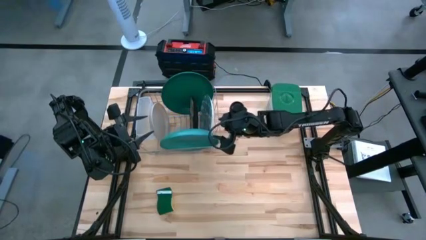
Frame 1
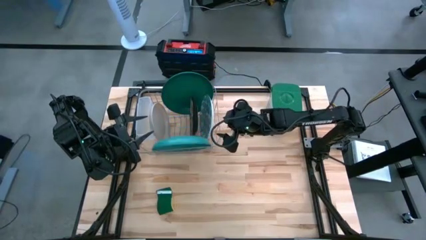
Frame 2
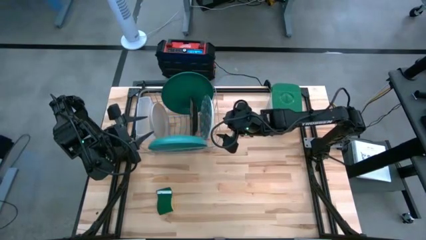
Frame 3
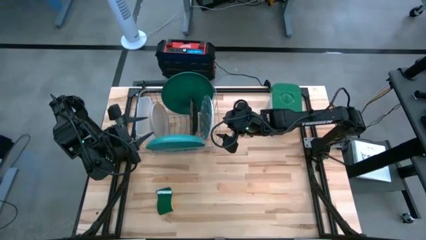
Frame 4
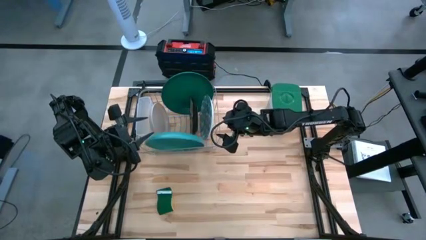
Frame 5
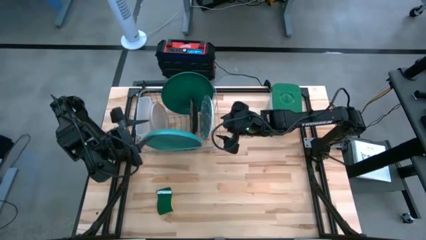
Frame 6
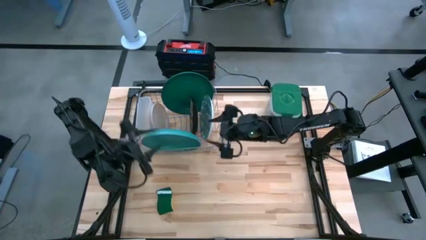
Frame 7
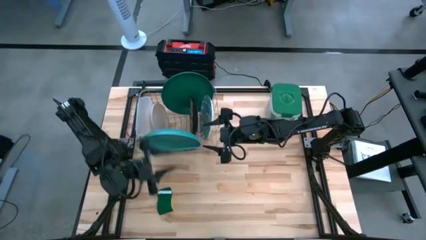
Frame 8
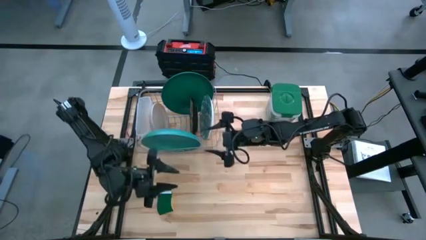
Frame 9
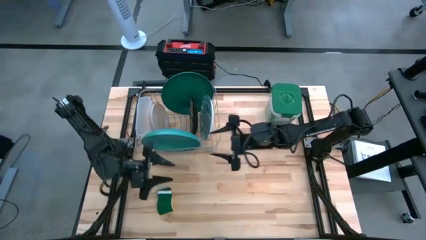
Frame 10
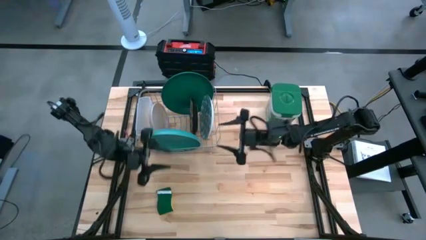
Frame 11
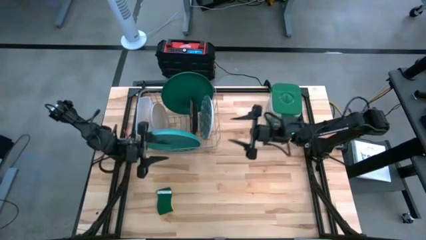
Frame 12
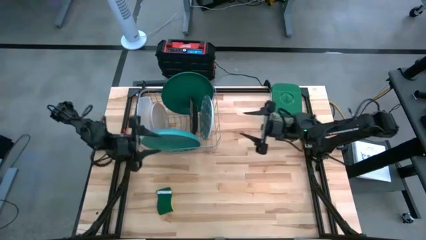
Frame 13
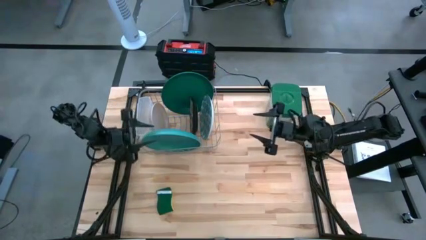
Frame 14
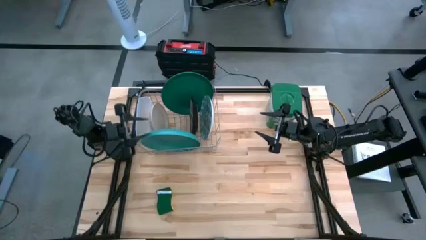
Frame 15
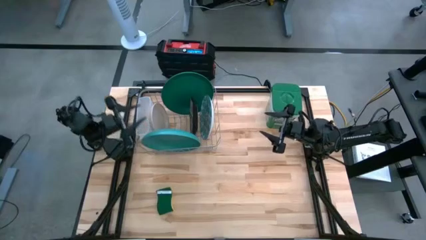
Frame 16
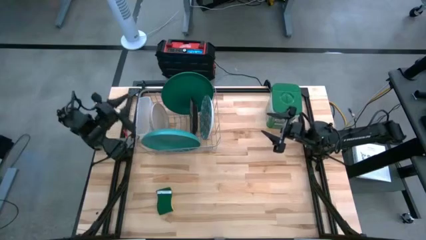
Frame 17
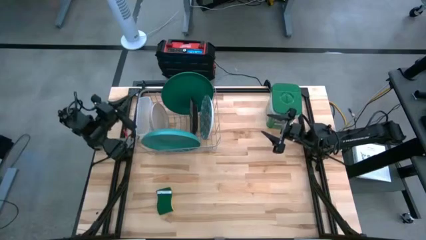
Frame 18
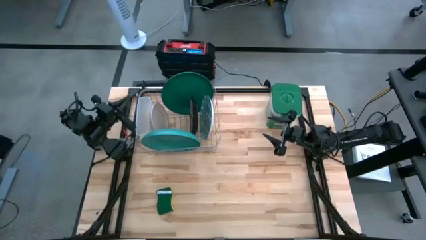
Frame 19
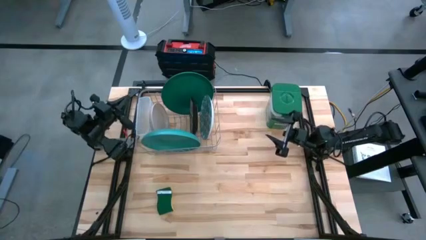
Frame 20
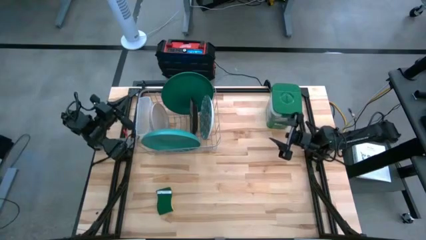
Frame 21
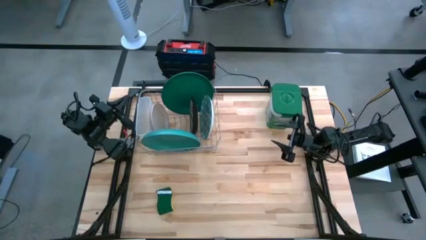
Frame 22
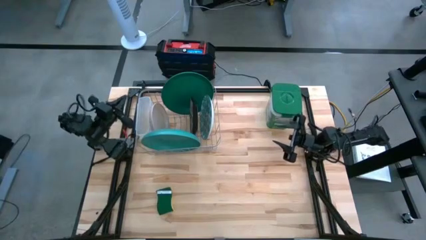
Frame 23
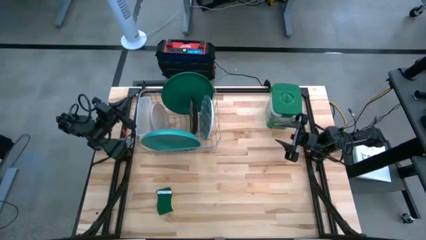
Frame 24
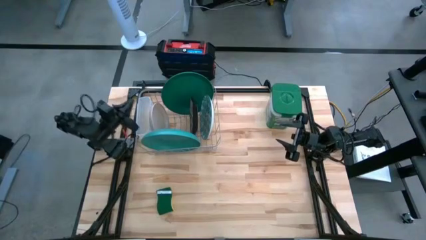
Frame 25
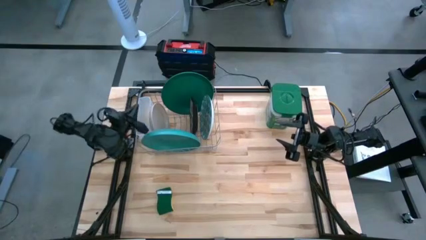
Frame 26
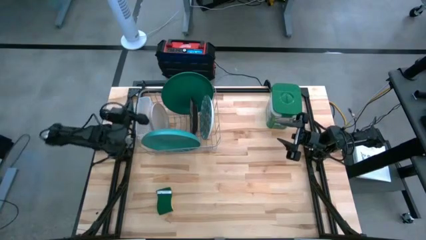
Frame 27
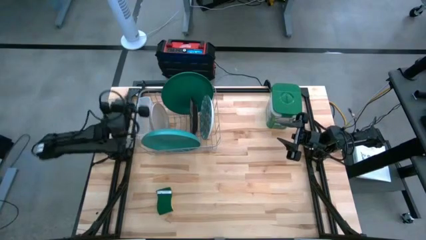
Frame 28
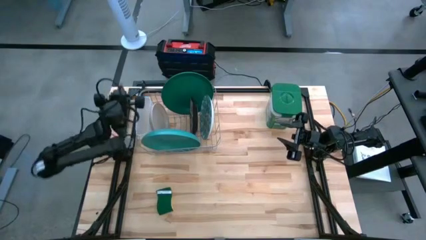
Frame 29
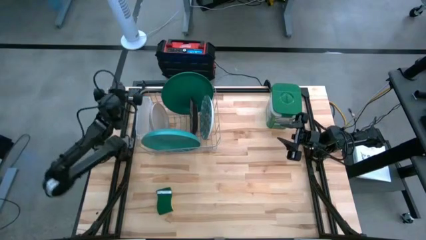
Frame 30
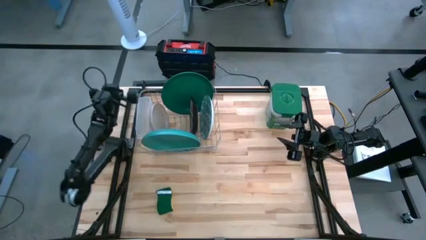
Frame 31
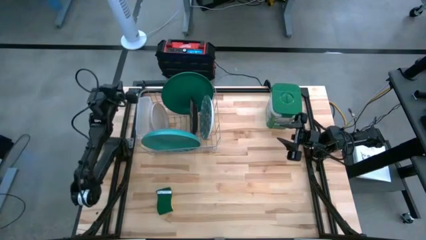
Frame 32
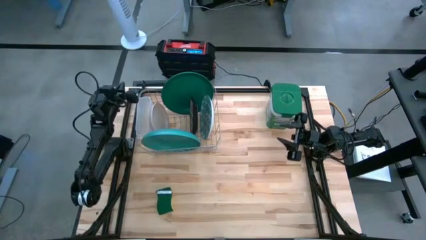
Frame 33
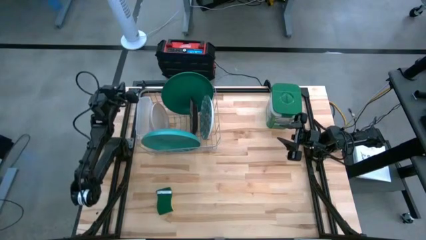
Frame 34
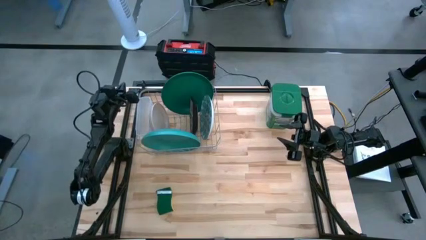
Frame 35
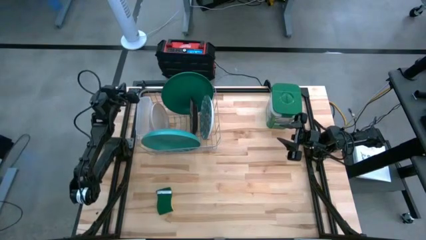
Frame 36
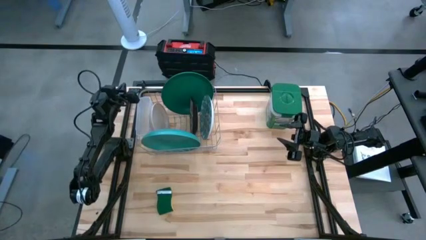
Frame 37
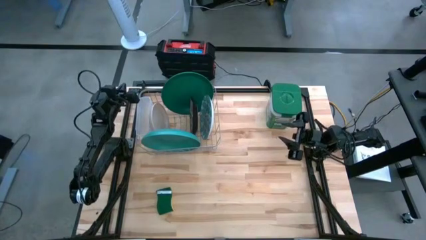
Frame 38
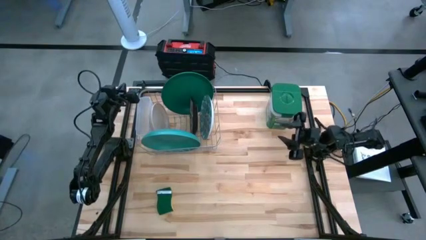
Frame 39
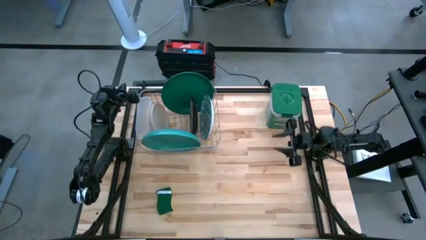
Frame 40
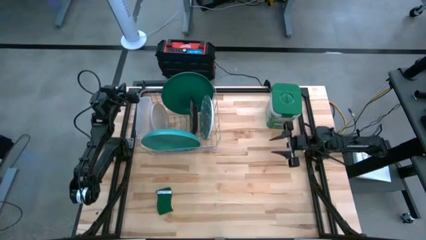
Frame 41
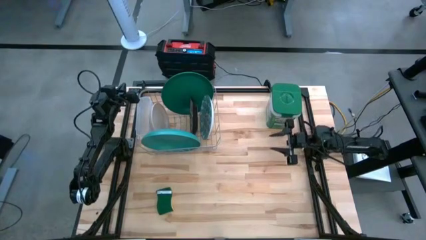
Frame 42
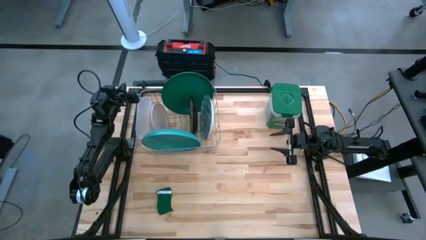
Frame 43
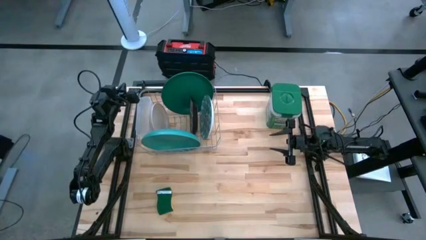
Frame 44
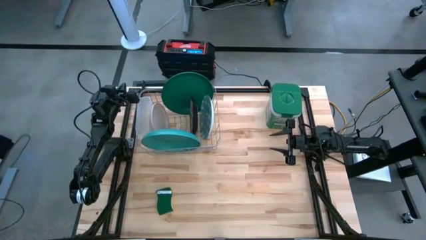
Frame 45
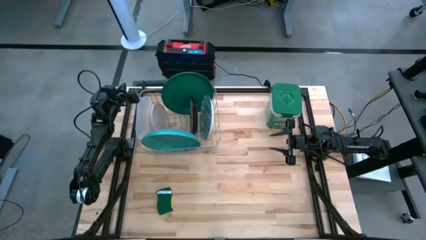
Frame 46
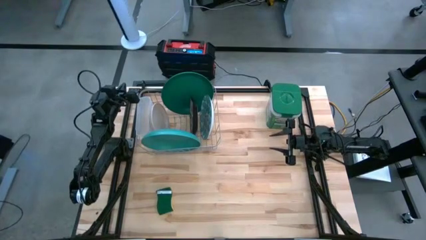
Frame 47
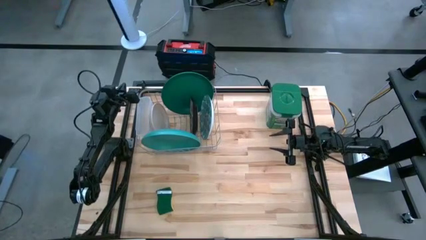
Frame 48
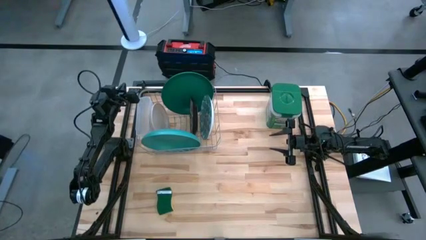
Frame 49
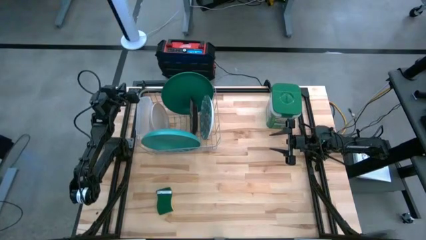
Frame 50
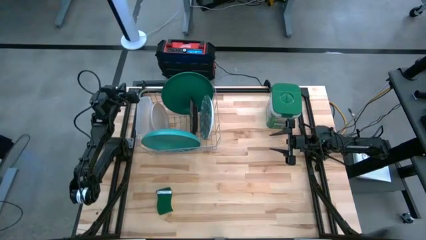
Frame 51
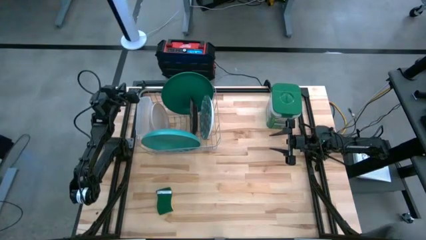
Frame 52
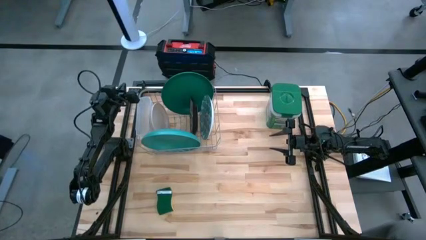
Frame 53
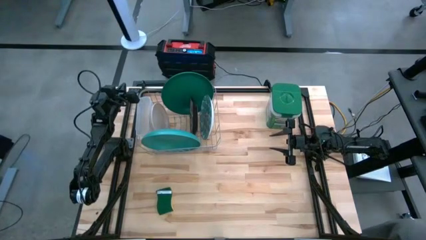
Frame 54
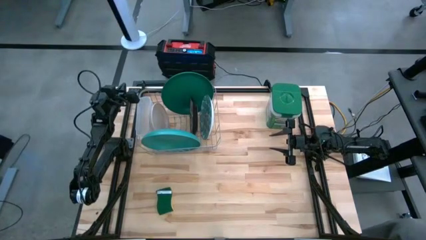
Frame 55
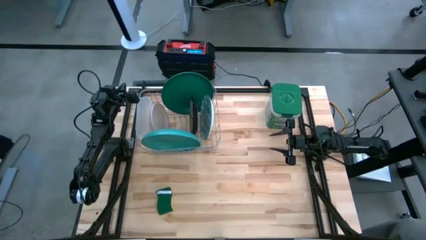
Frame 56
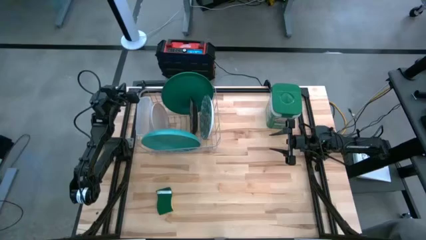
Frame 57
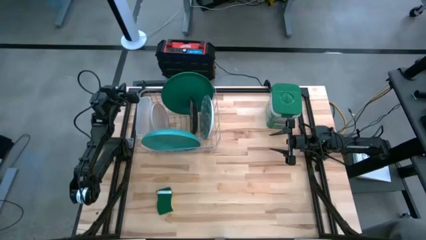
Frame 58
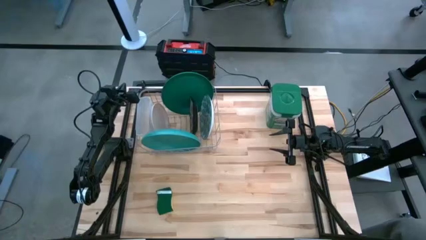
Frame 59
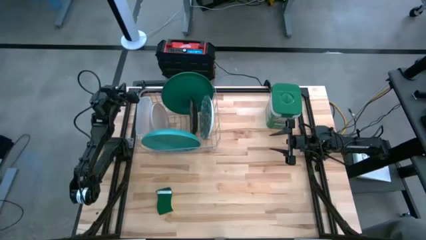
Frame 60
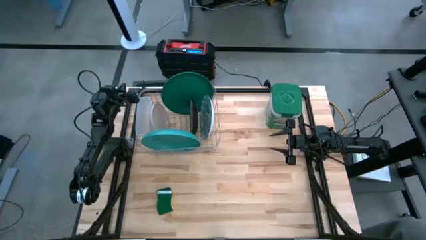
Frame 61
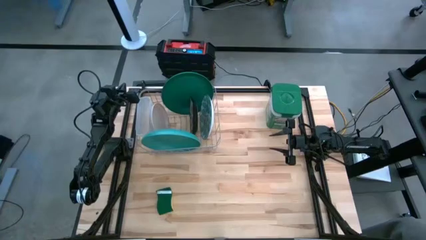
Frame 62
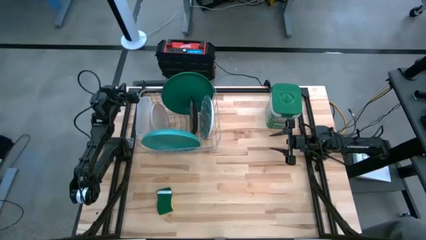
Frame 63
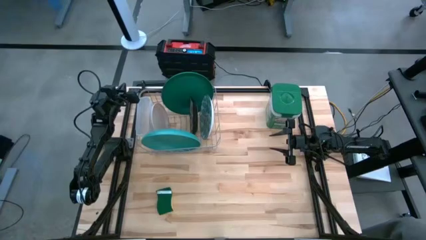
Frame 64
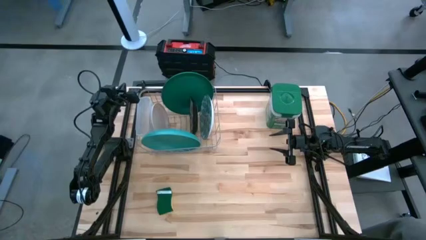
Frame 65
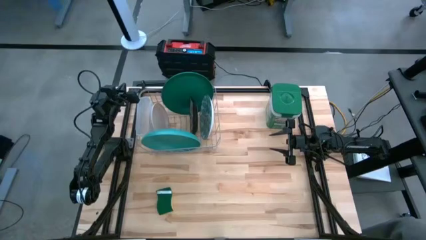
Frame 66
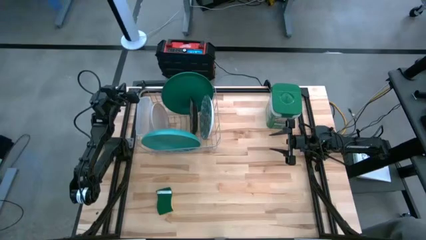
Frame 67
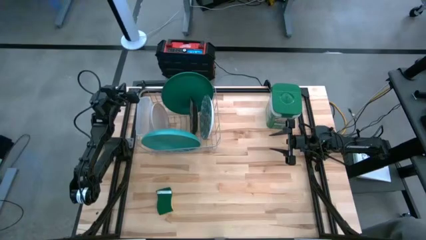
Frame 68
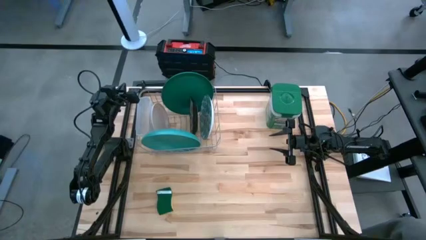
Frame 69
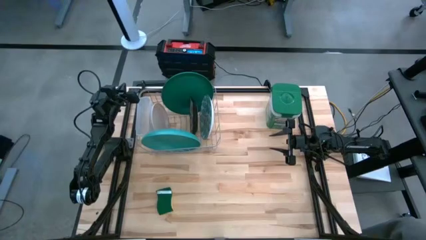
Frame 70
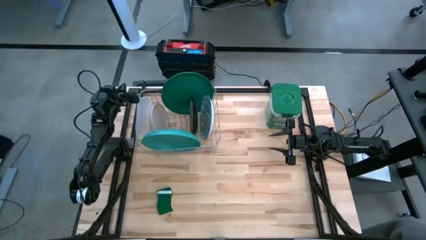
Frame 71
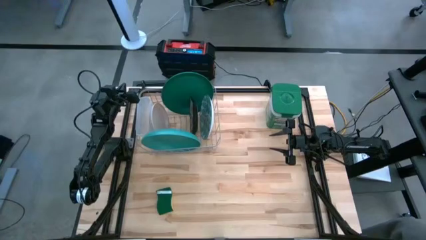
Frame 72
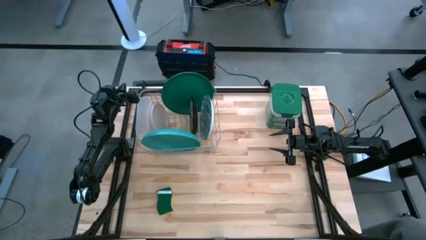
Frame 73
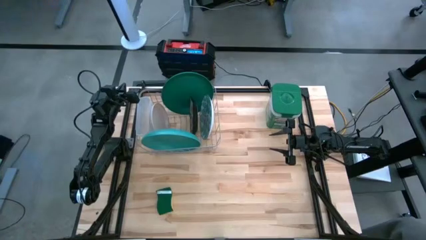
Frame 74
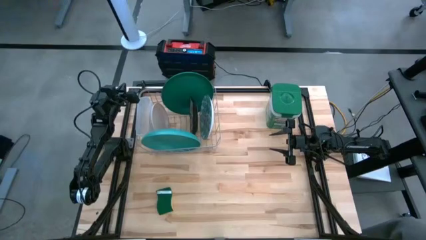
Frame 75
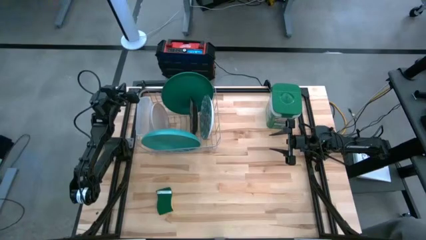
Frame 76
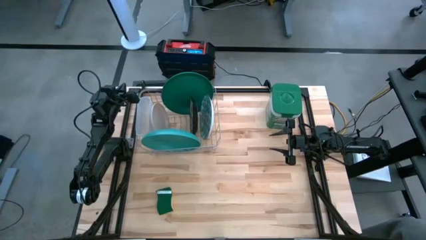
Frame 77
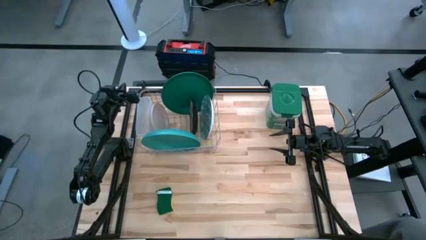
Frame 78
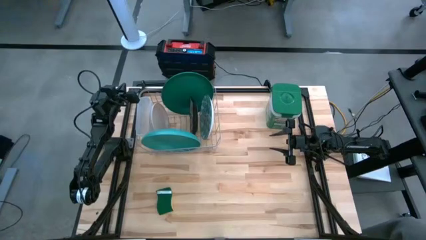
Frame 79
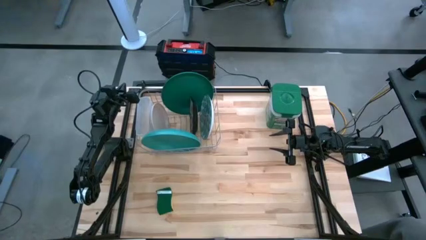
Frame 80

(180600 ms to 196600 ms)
Task: Sort dishes
Return to Home Position

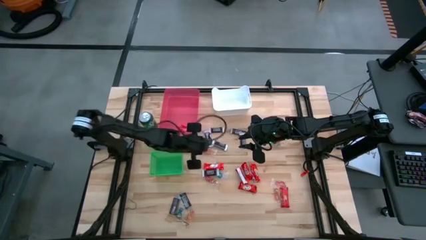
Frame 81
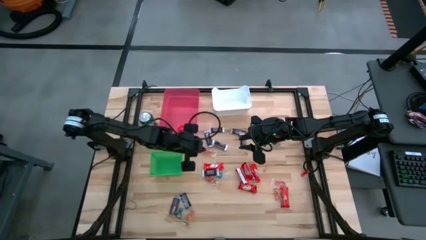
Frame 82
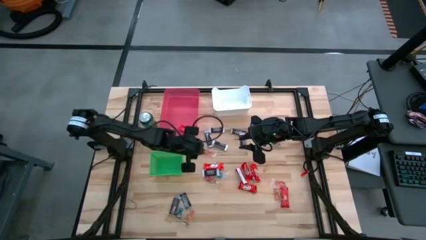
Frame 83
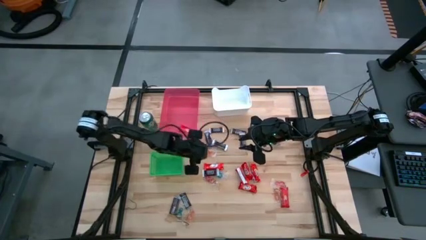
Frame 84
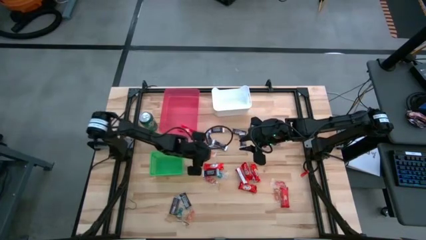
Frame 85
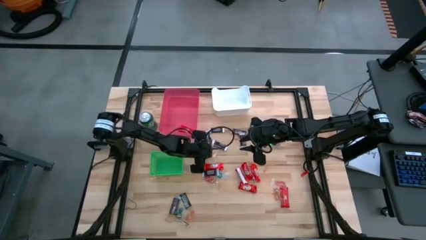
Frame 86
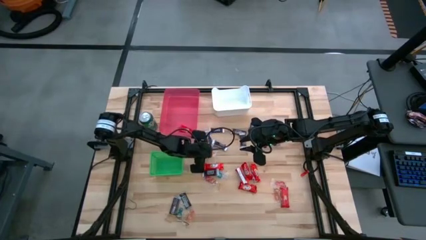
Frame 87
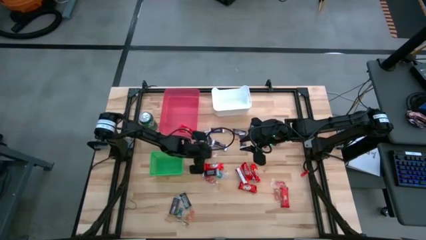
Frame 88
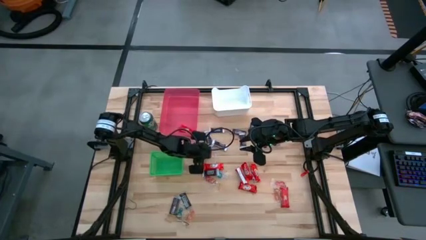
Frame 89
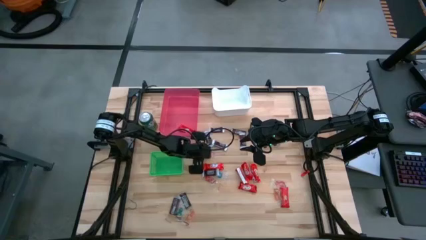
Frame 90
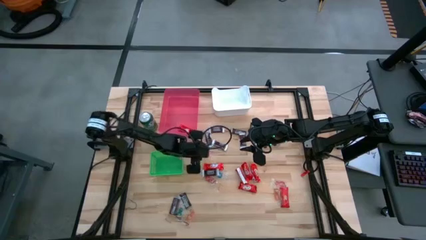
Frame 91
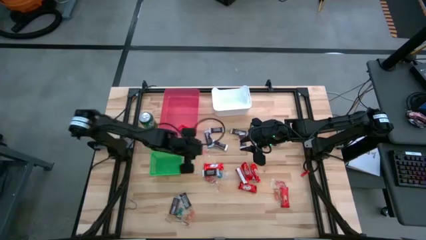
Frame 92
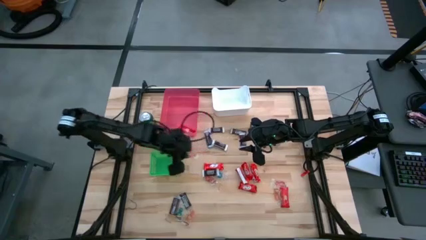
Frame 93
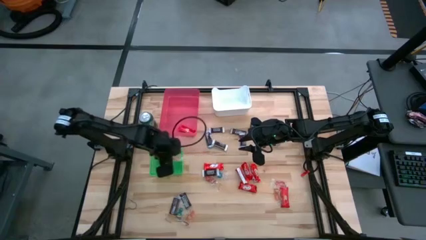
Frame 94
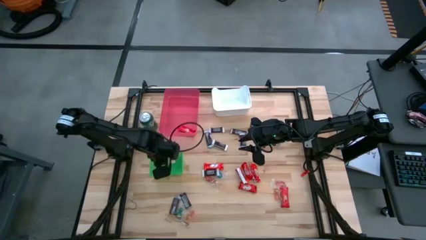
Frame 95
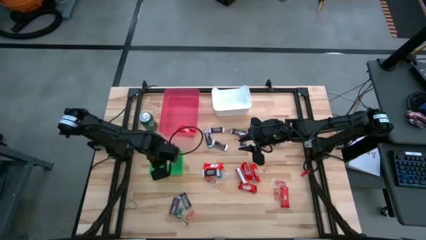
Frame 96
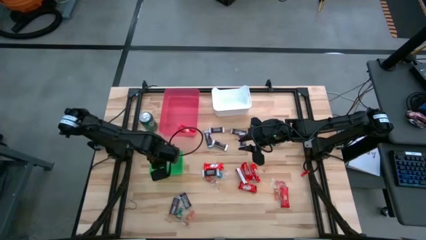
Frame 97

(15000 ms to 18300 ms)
Task: Organize candy in baskets
Put the orange gummy into the green bin
